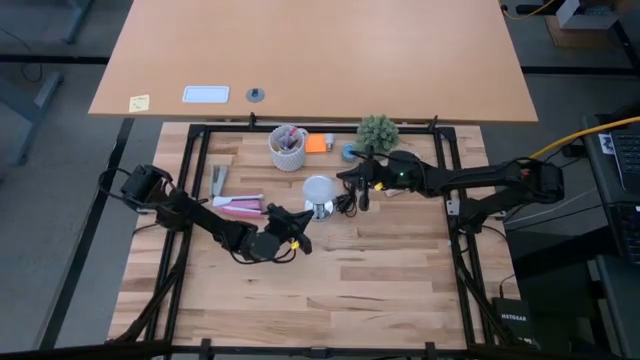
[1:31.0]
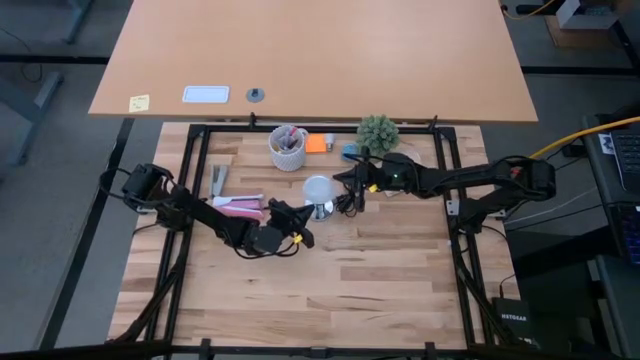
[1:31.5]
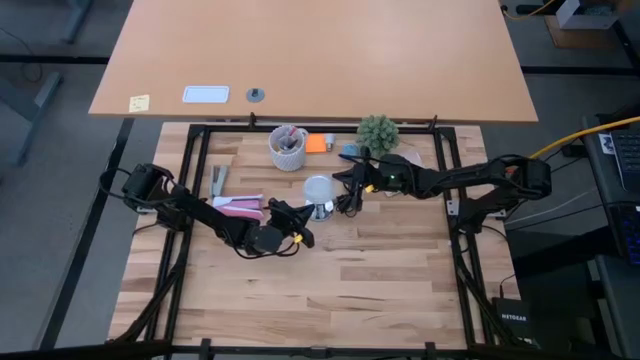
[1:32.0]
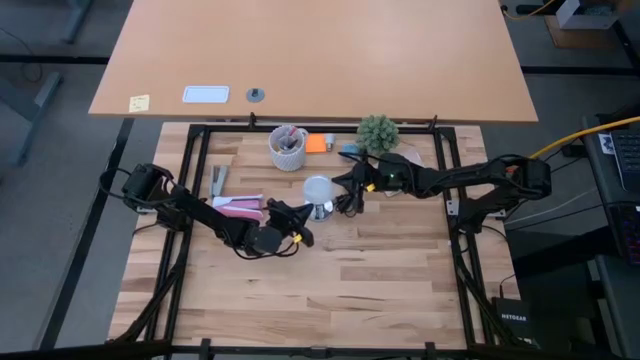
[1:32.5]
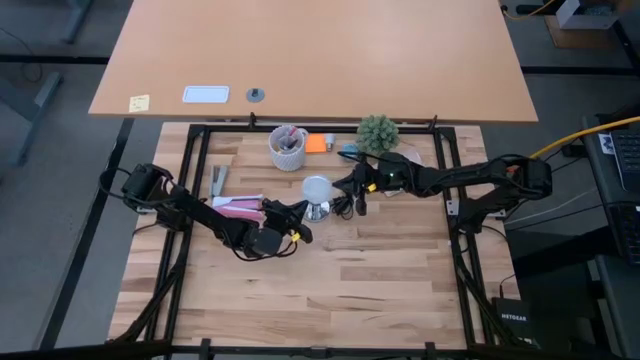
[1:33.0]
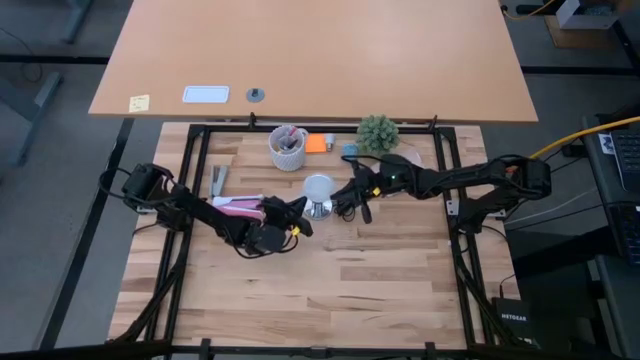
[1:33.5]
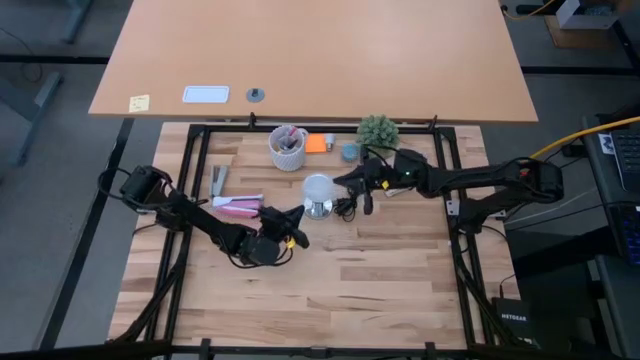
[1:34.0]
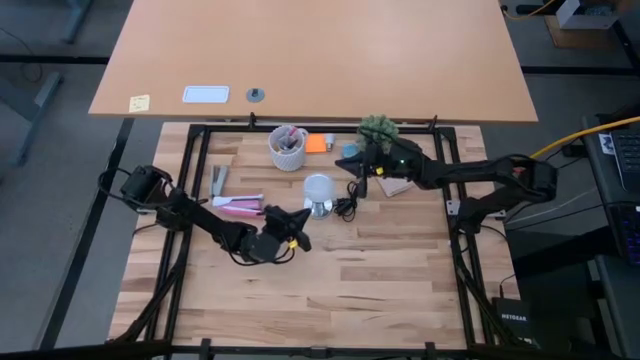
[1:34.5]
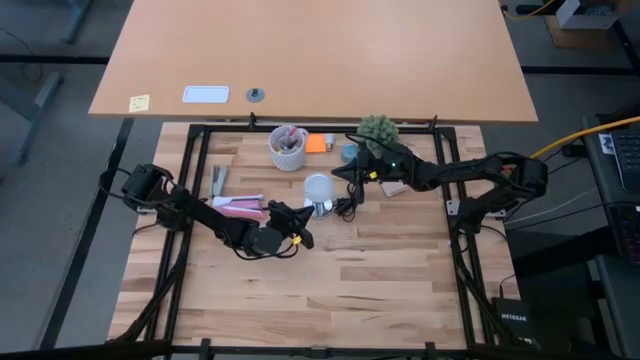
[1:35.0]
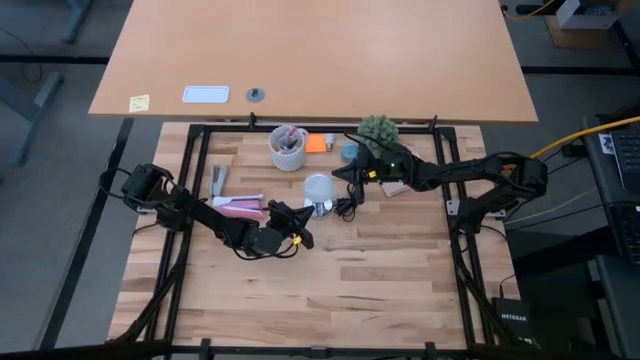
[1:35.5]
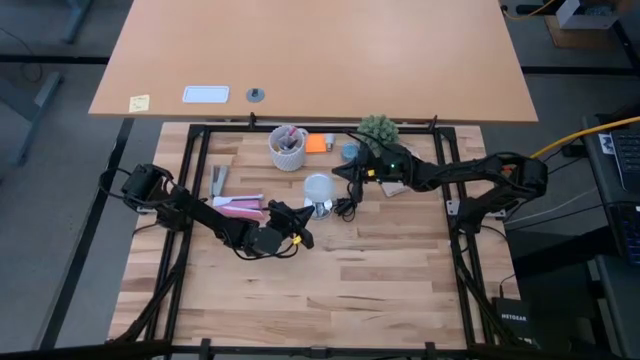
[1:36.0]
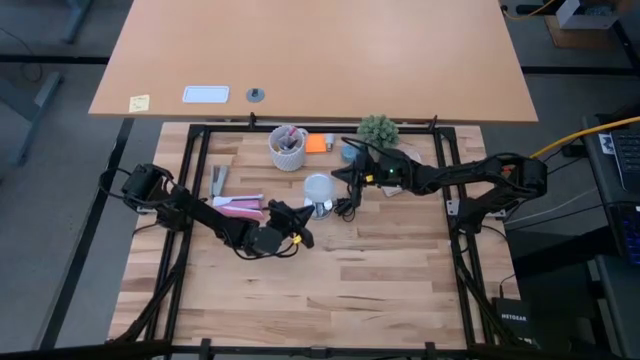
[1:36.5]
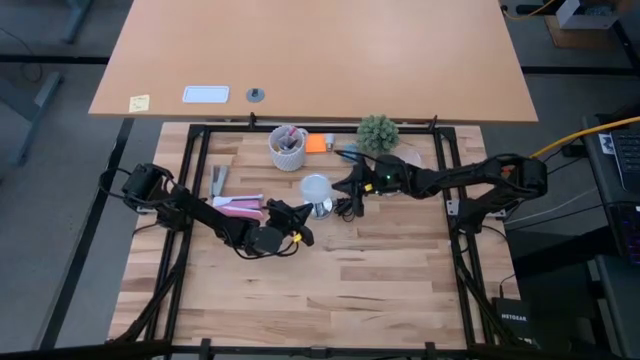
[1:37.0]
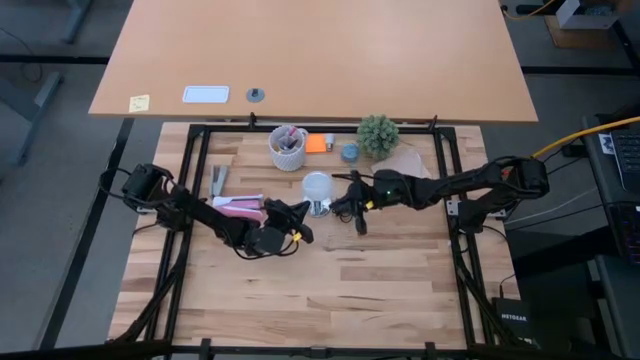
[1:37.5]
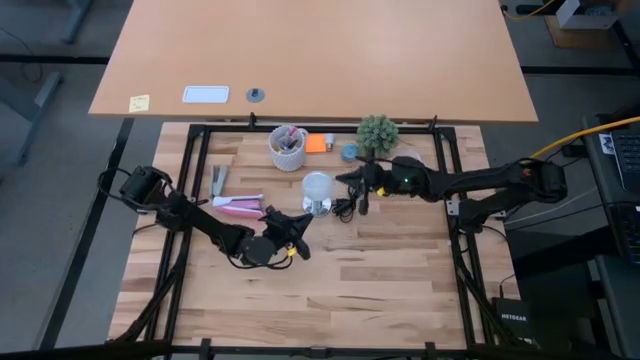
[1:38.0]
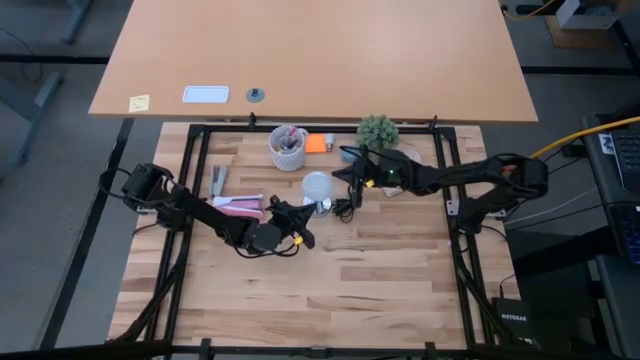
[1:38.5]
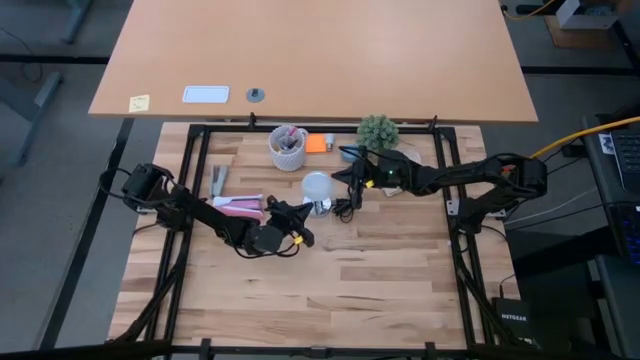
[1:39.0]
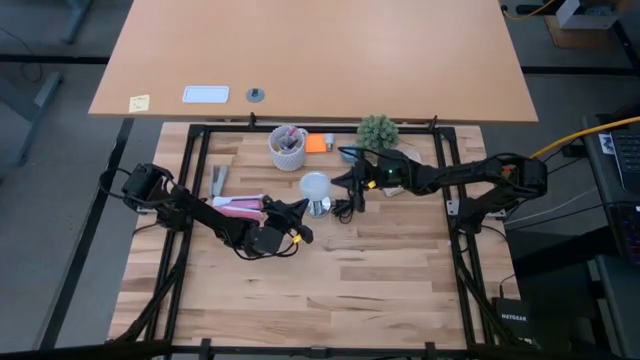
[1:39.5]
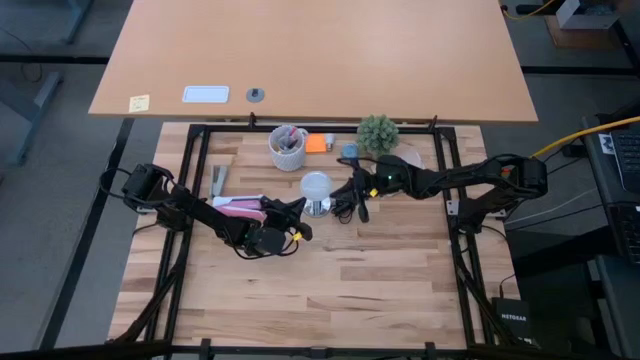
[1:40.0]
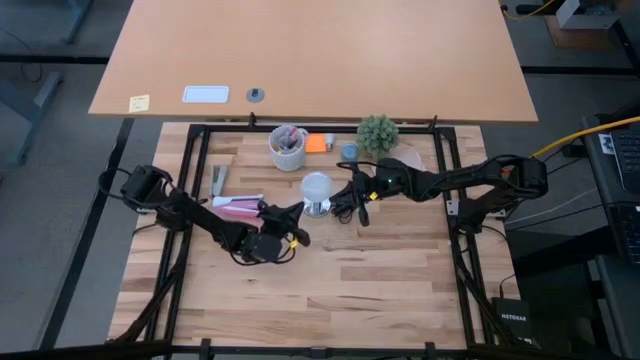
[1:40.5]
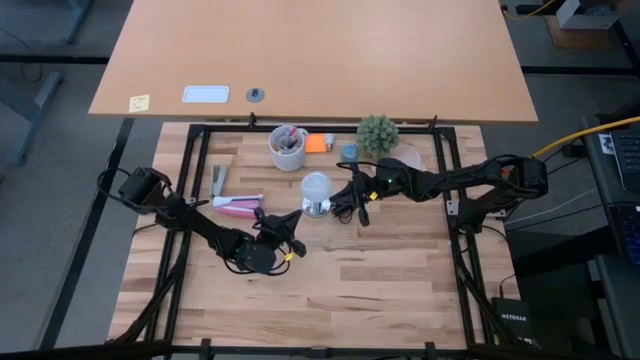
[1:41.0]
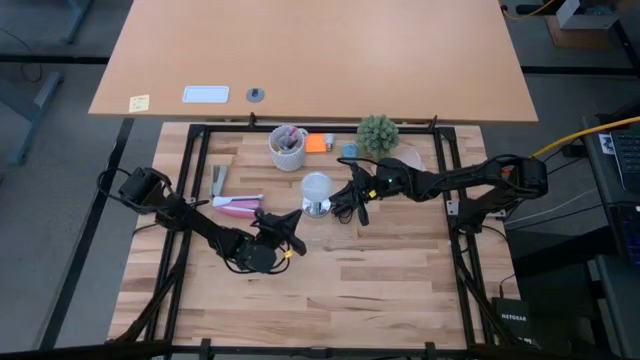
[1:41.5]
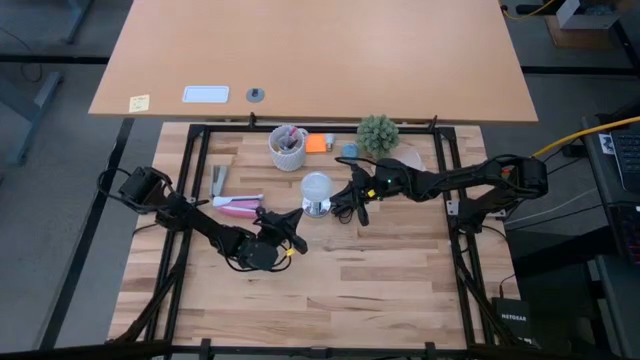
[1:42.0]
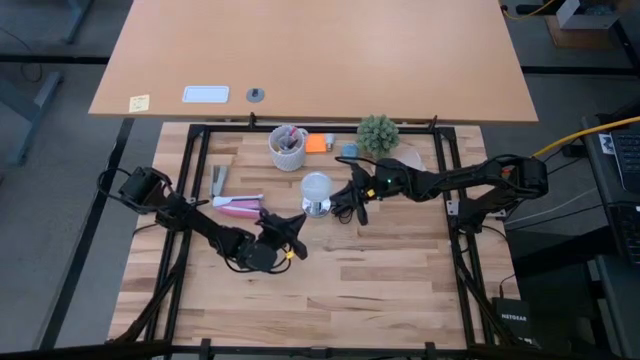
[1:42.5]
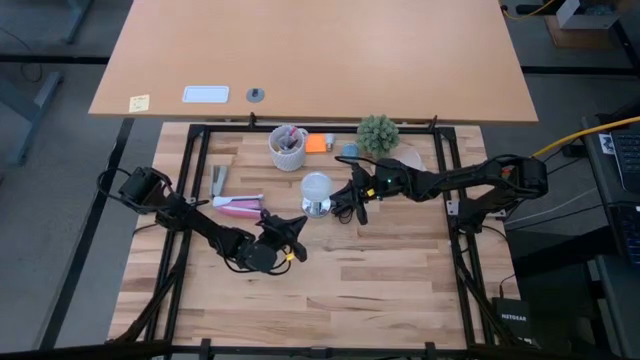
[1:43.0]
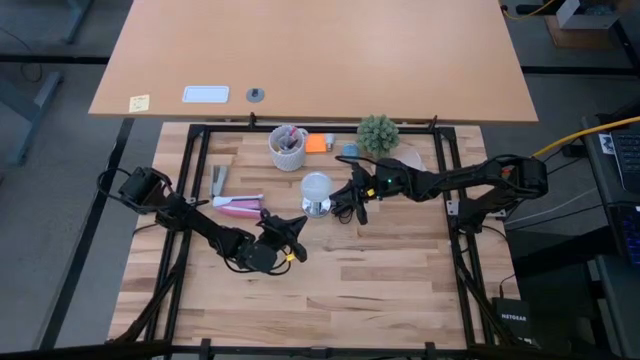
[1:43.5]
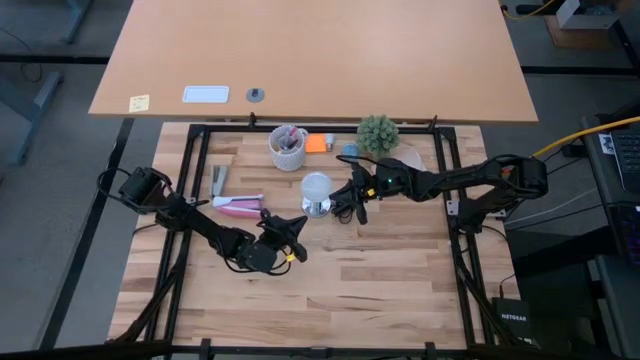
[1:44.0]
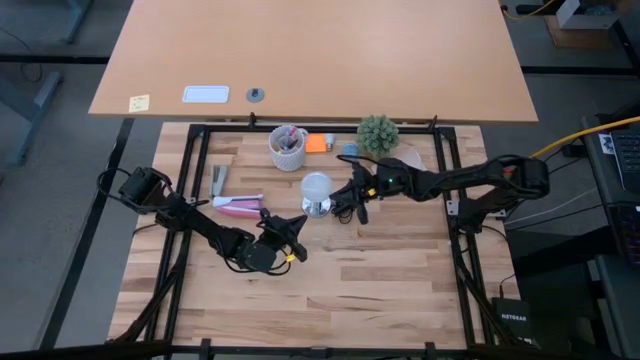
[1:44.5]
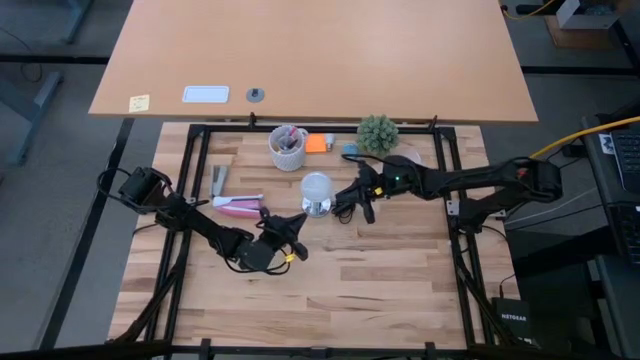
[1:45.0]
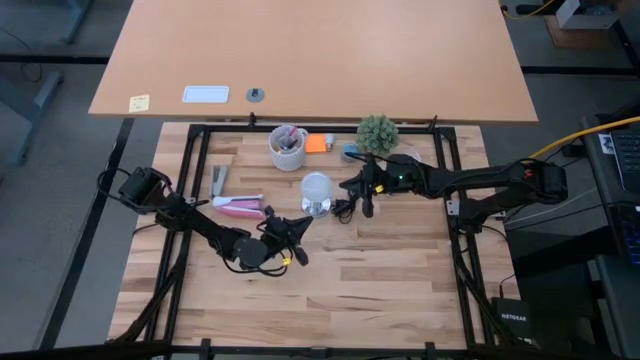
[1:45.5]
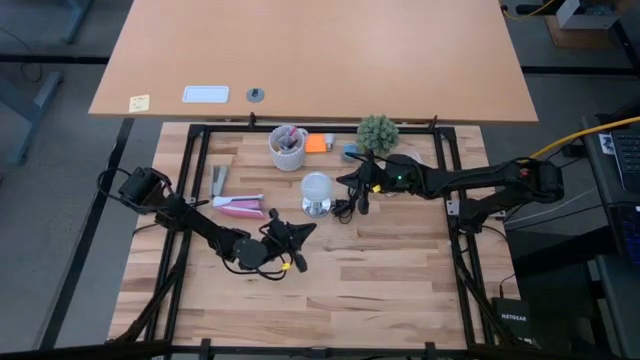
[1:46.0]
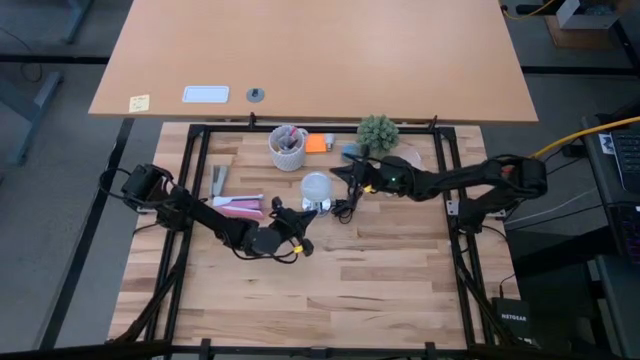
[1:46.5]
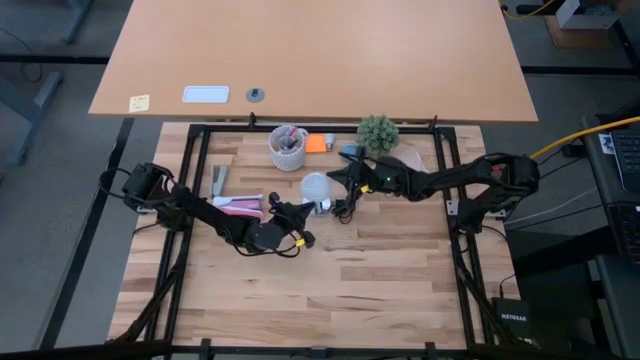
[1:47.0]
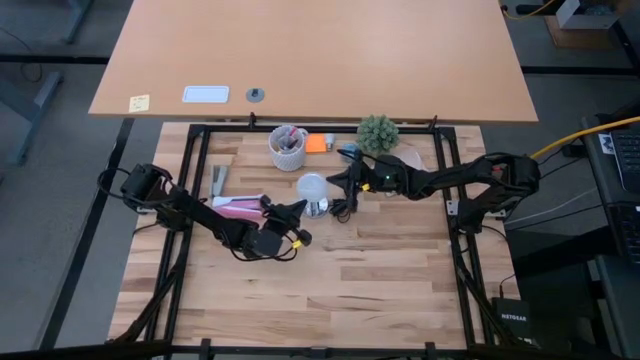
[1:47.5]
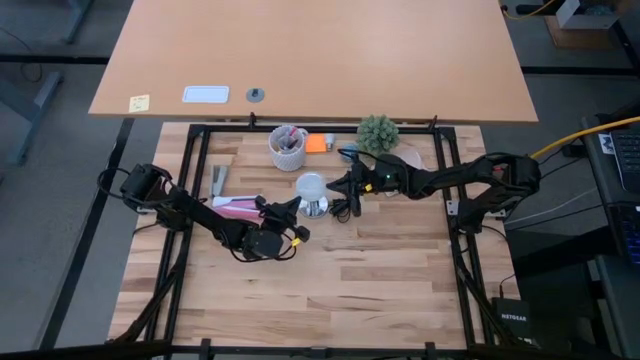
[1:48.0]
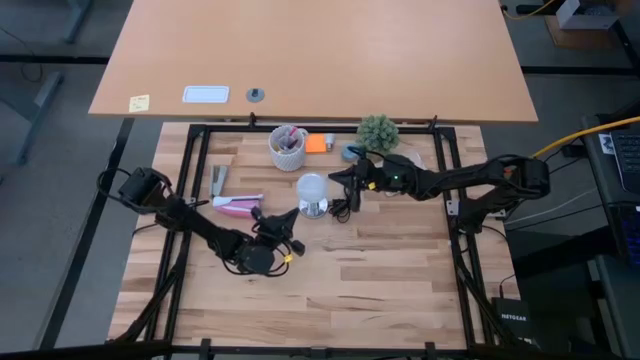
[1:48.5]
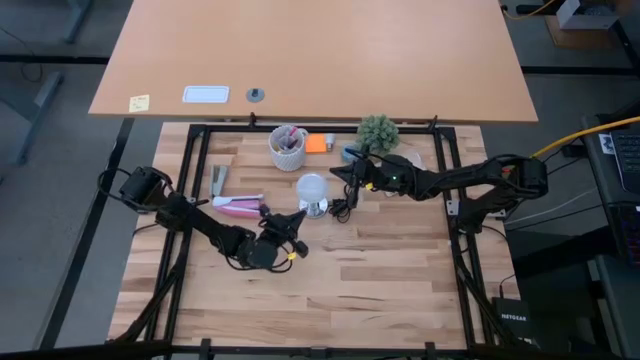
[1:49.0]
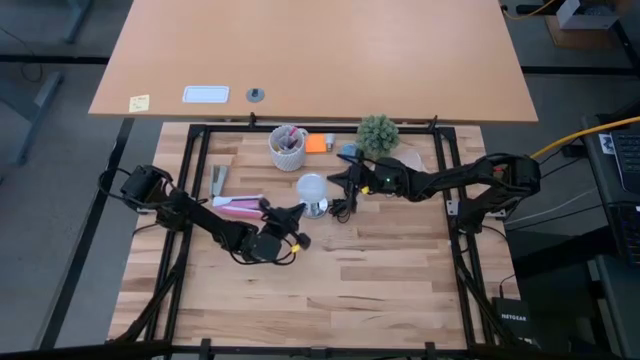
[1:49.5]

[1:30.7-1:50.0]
Task: Screw lightbulb
Insert the white light bulb into the silver lamp

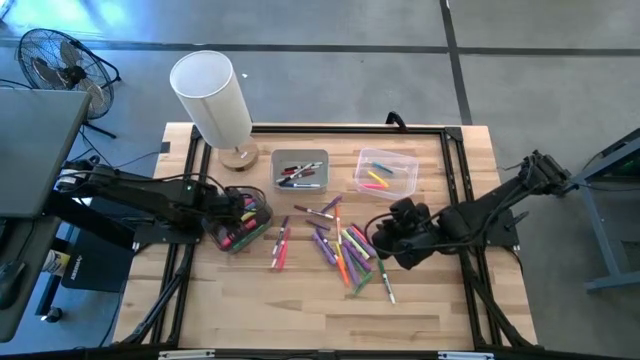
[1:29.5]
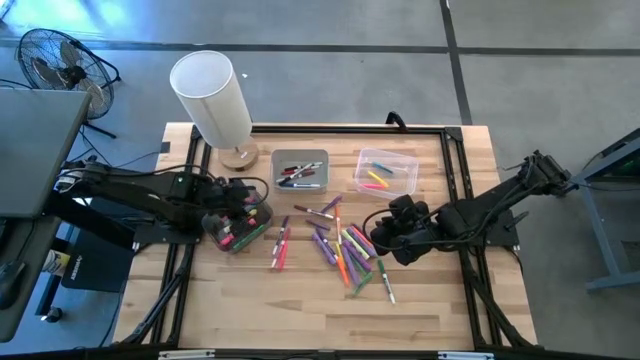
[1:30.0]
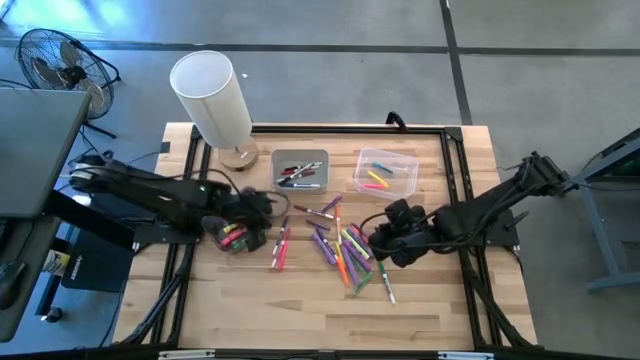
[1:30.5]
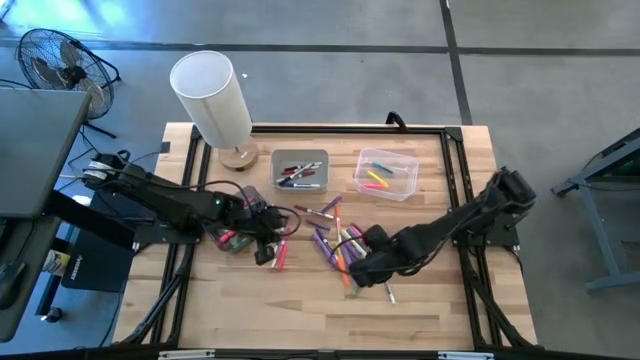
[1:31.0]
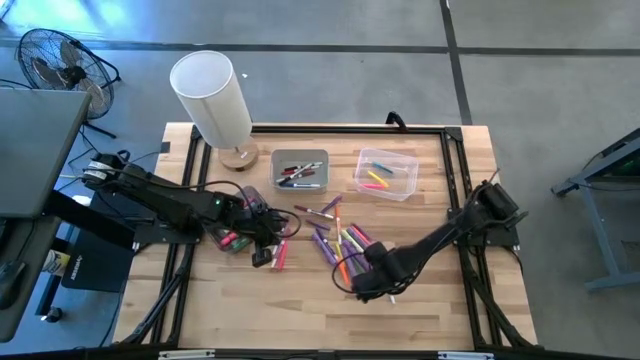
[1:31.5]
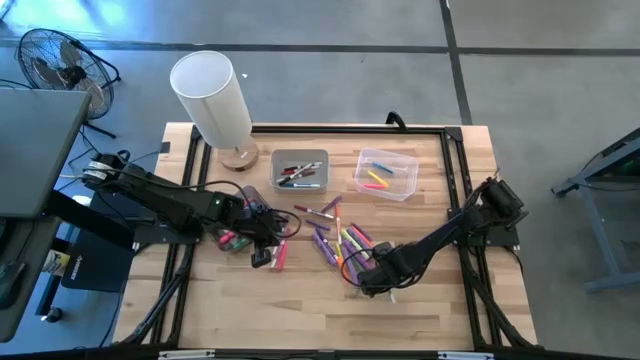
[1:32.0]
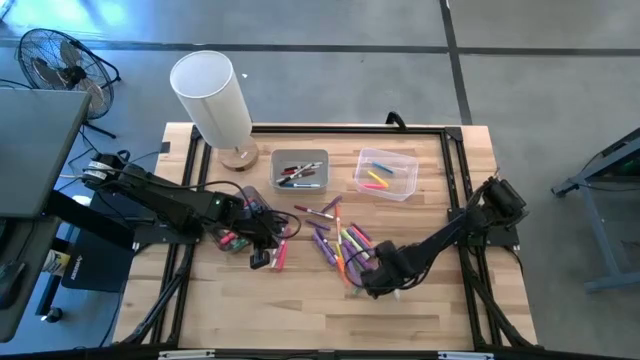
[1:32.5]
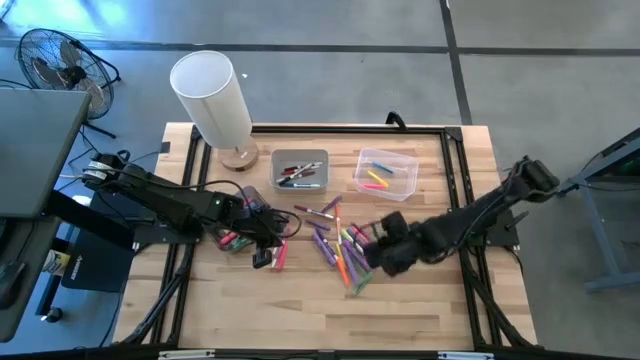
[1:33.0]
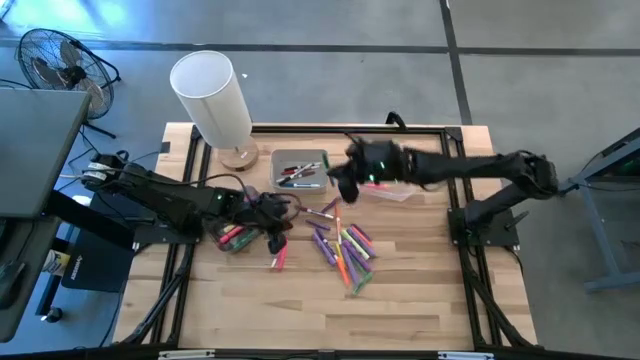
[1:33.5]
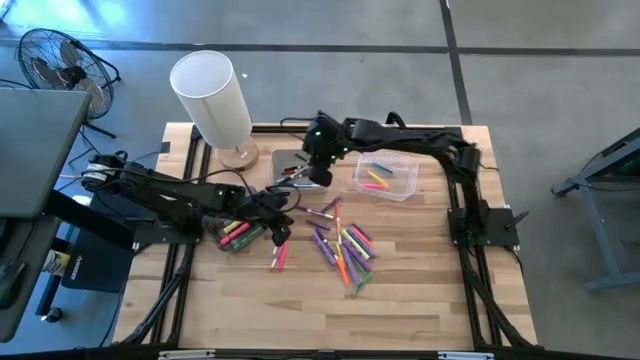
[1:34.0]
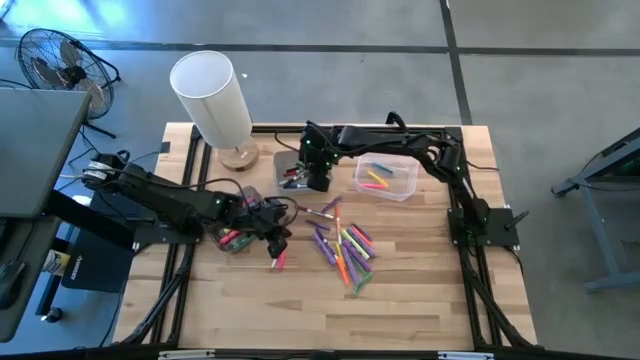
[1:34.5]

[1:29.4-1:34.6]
Task: Pick & Place Markers
Put the green marker pen into the white bin
